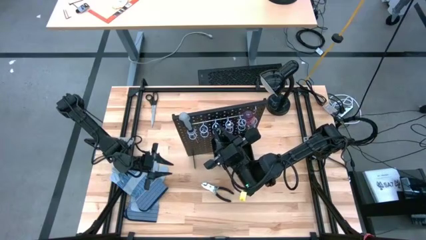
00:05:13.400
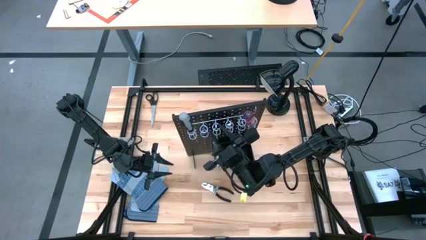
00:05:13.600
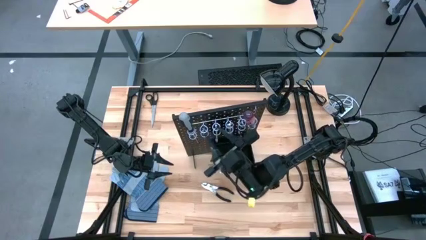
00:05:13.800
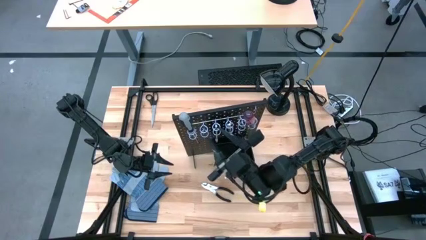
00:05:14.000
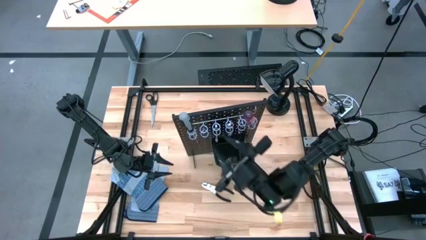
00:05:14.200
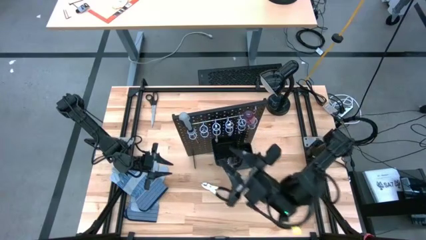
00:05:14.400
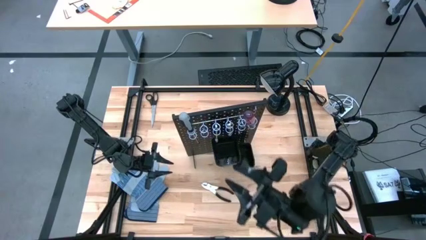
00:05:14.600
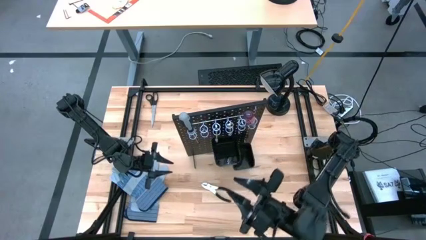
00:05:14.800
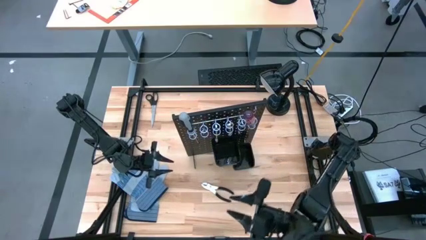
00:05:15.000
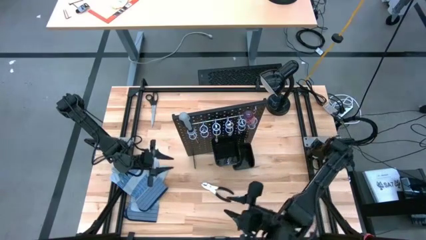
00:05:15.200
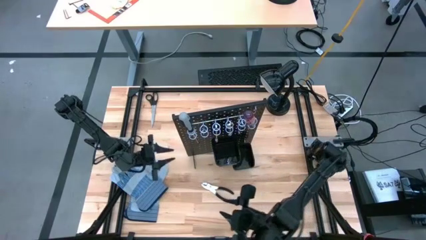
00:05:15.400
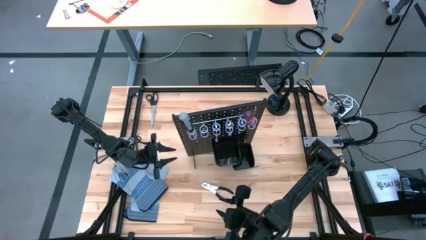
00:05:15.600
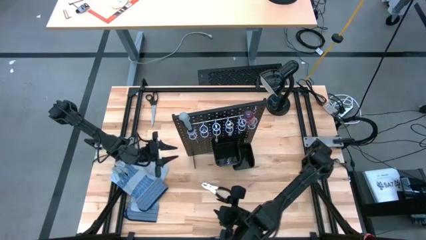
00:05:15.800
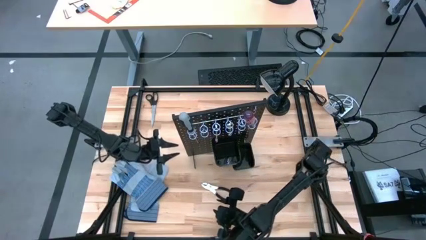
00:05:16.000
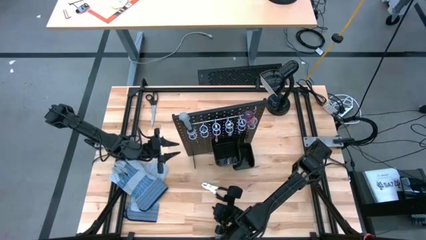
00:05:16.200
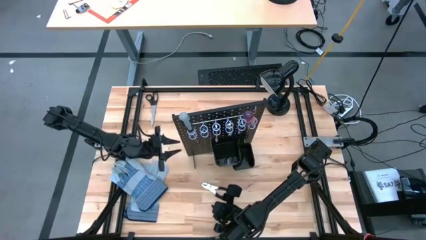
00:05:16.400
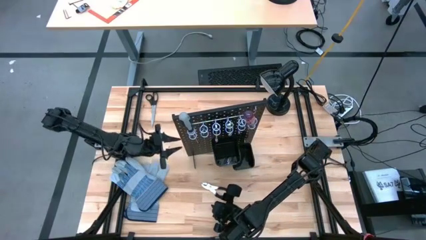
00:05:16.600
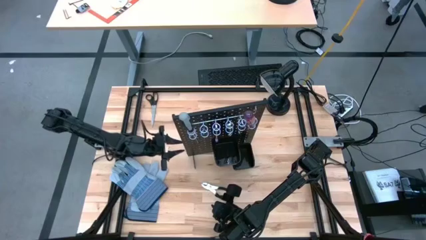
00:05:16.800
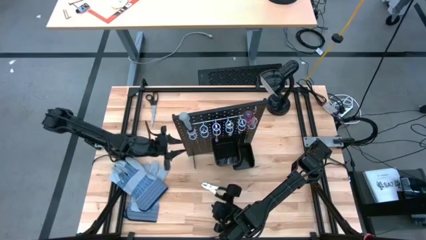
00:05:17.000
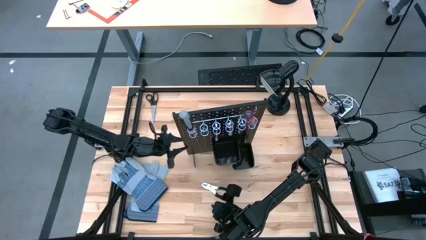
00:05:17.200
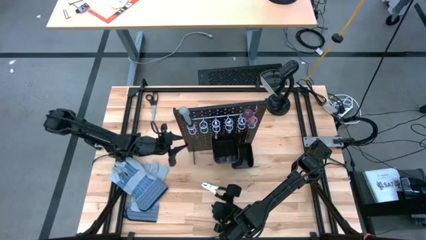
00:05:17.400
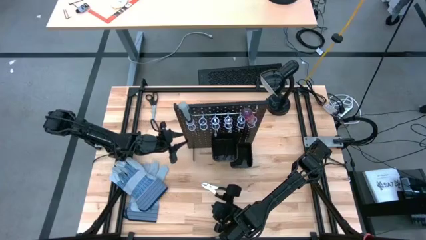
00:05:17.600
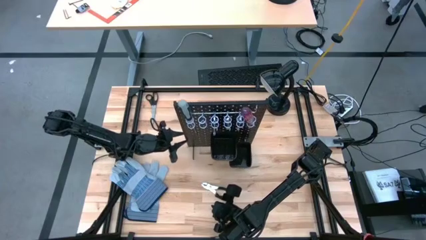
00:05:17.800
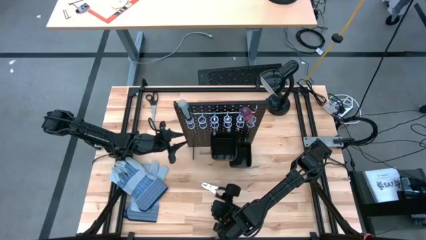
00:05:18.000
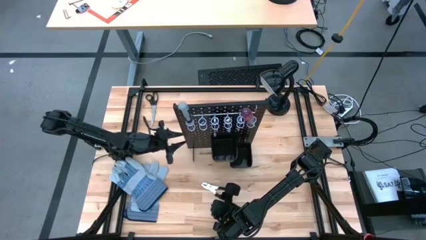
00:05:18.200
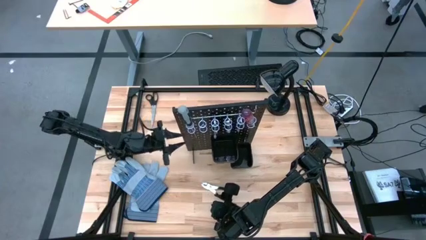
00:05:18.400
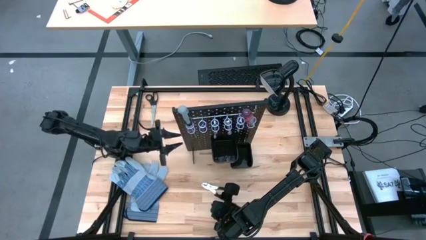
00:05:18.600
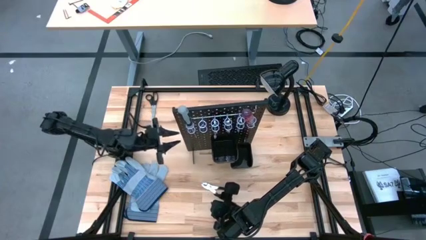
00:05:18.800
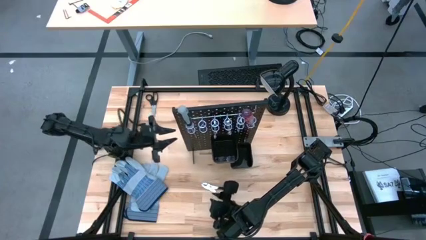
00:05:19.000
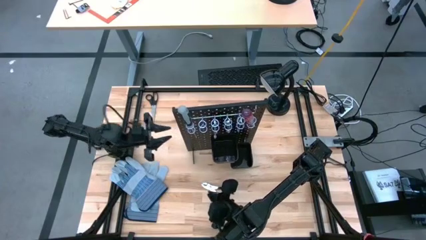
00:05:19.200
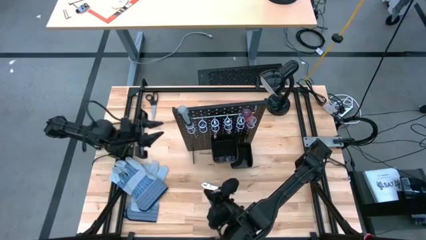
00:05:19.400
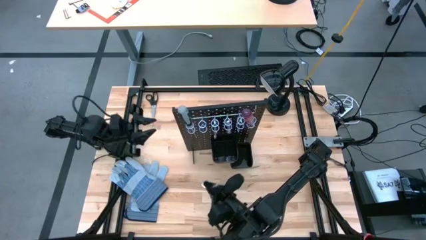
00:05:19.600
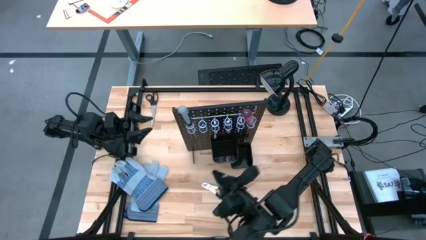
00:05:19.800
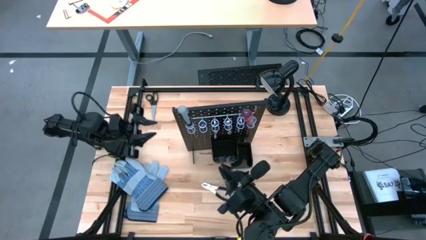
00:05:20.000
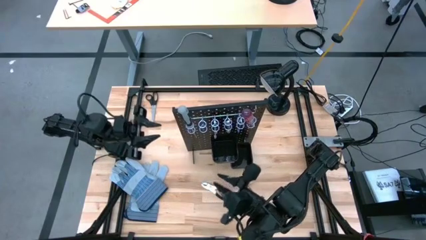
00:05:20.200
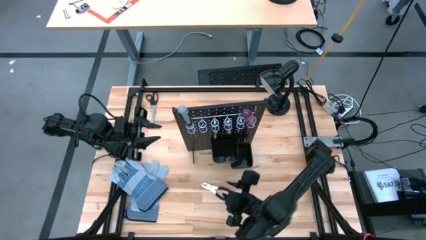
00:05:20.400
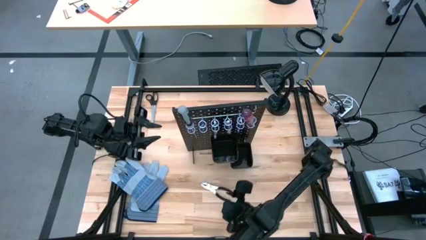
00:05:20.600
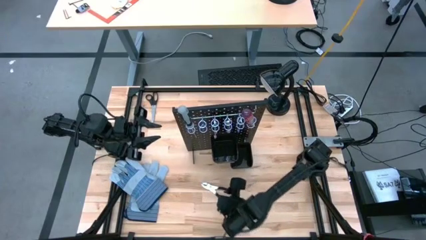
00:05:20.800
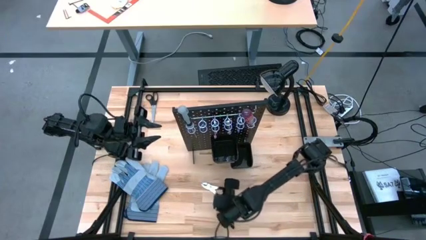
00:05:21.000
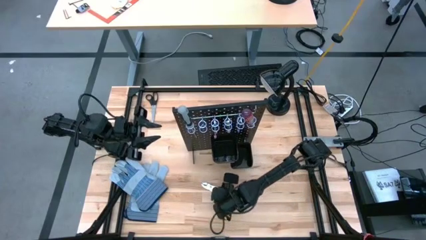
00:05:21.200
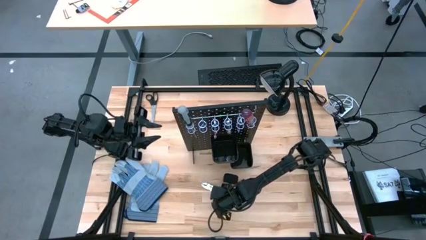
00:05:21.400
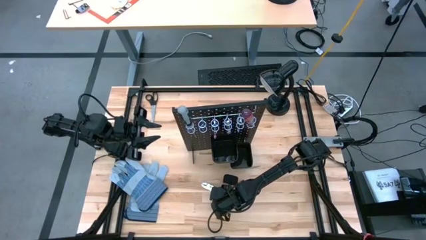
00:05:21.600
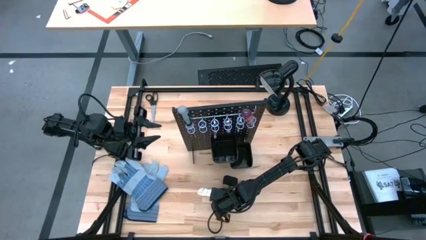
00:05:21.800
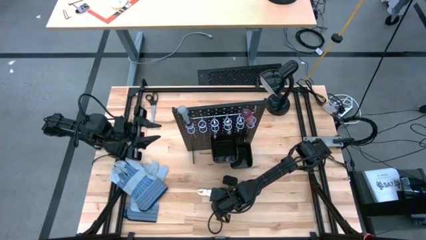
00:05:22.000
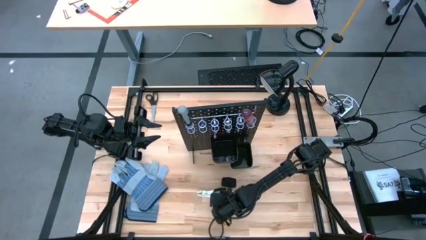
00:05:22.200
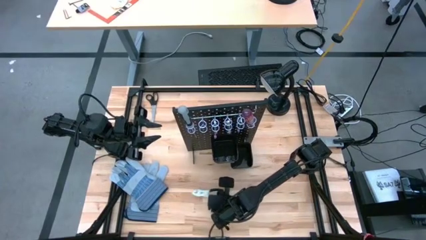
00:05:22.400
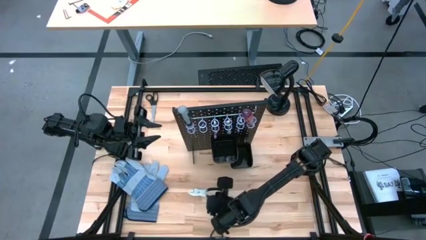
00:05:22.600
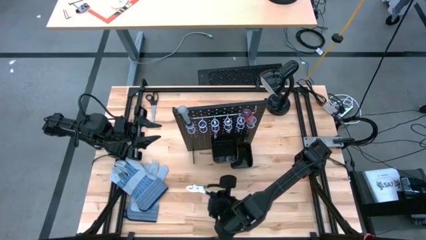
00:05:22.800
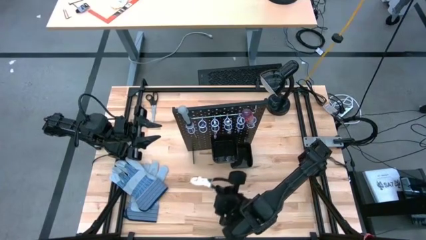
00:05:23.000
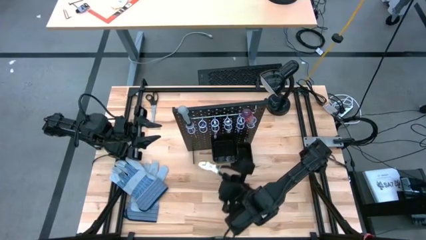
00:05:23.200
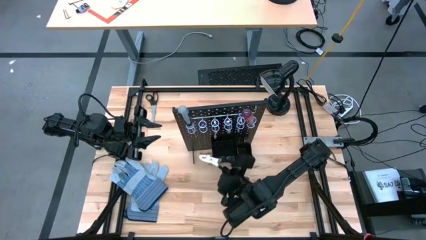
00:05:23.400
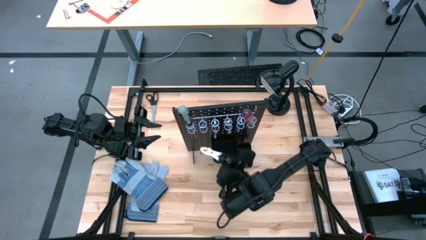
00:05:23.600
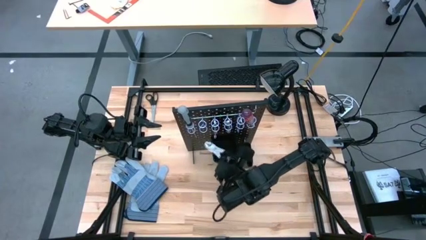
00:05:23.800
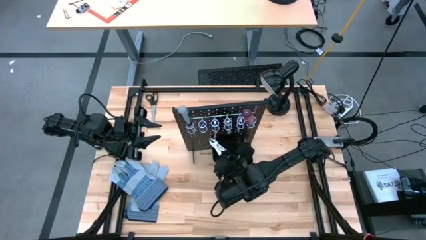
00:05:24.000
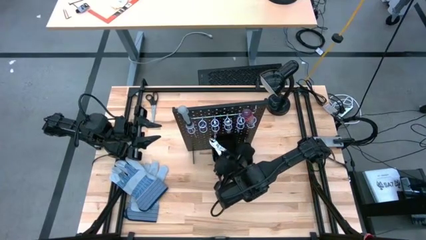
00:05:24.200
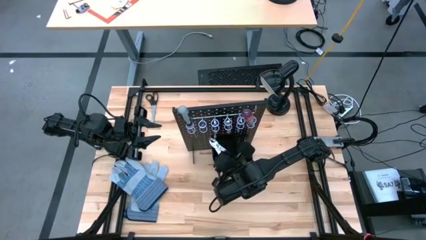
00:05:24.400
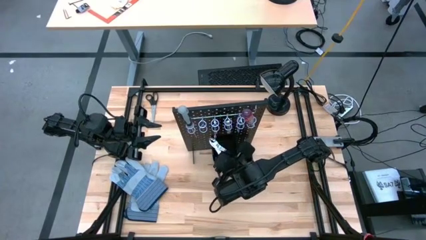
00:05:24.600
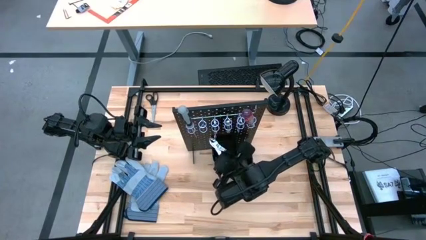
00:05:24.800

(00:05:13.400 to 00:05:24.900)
Task: Hang tools onto peg board
Put the black pliers into the black container on the peg board
